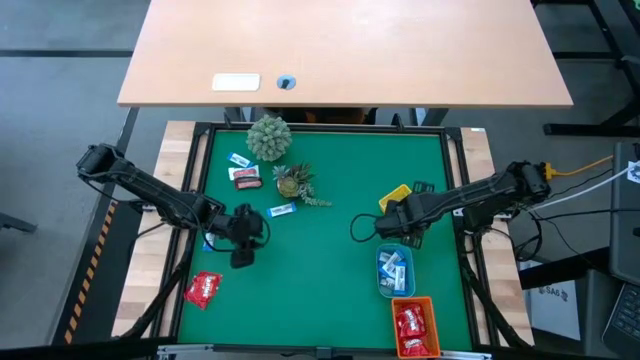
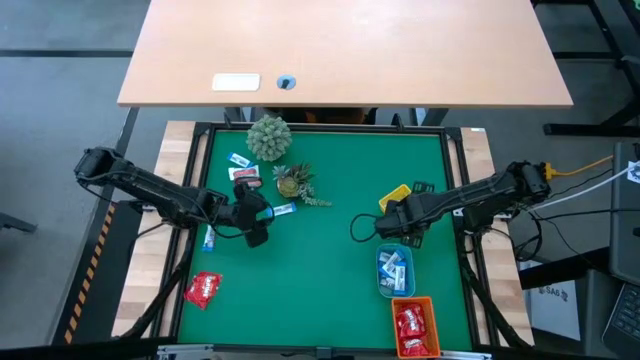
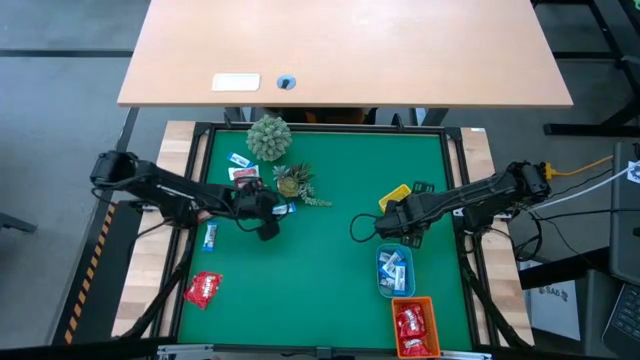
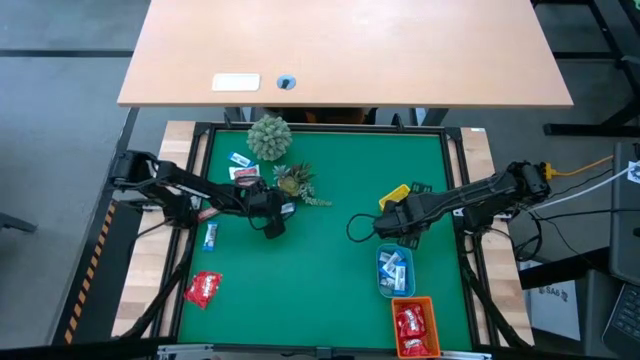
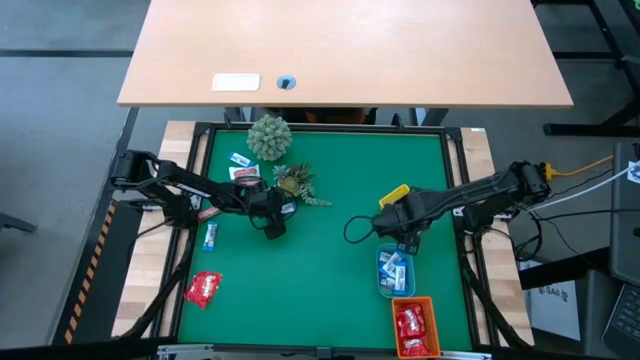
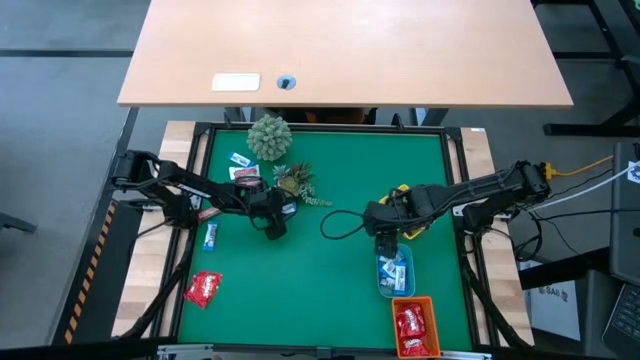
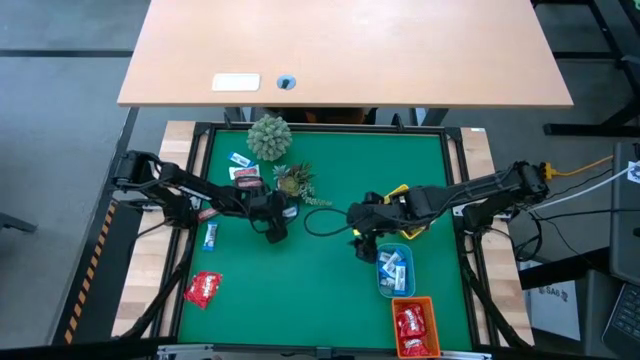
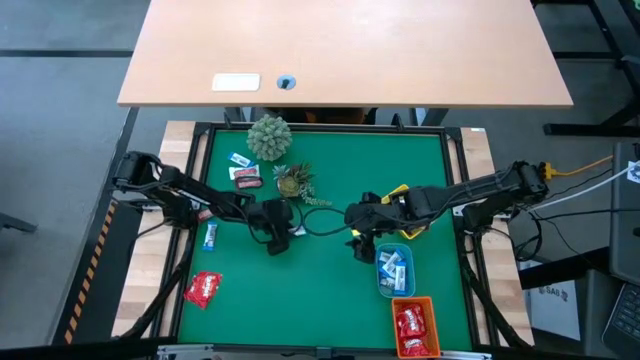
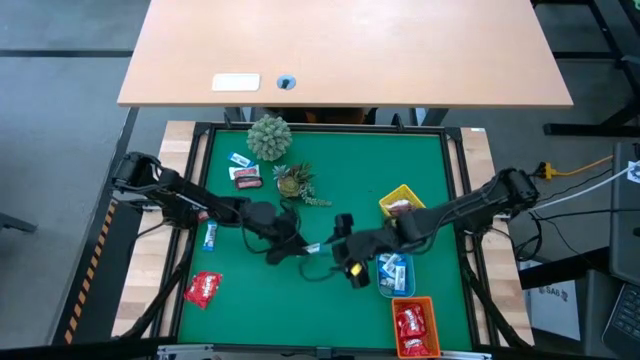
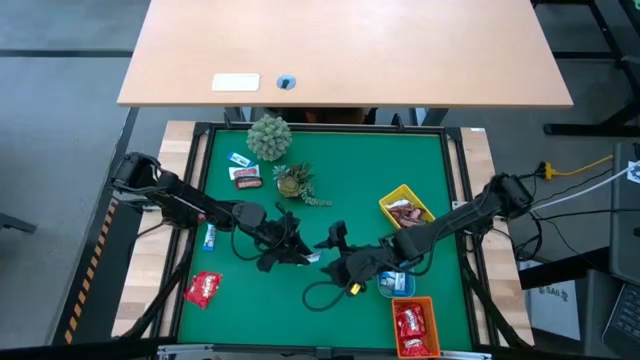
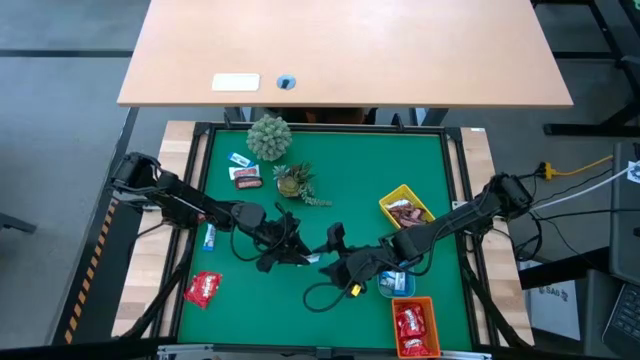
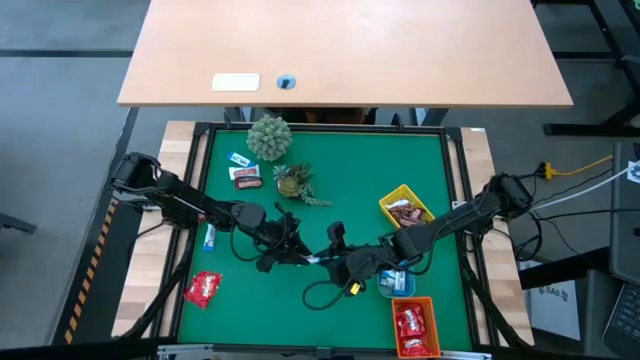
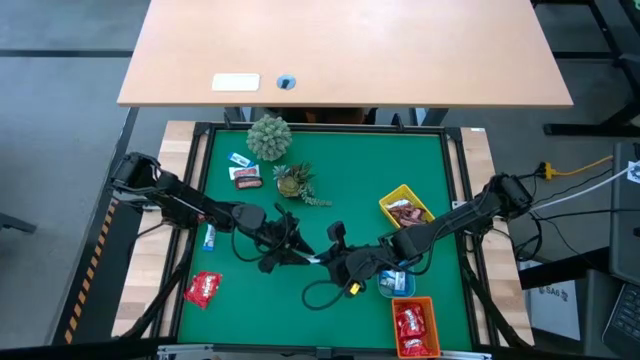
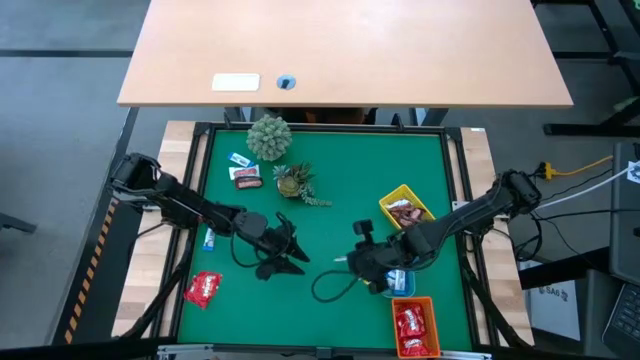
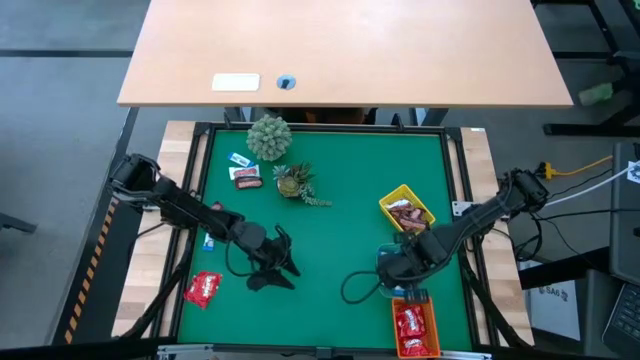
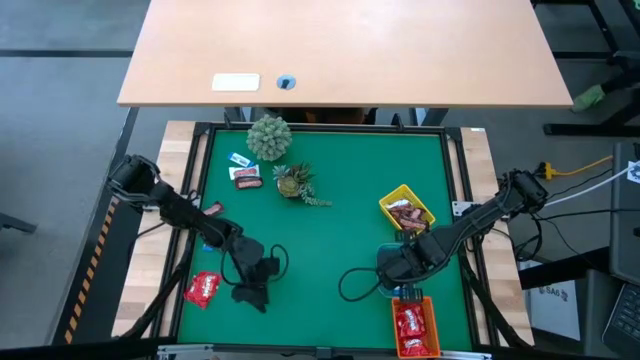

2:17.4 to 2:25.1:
Task: Sort candy
Put the white chocolate into the blue bin

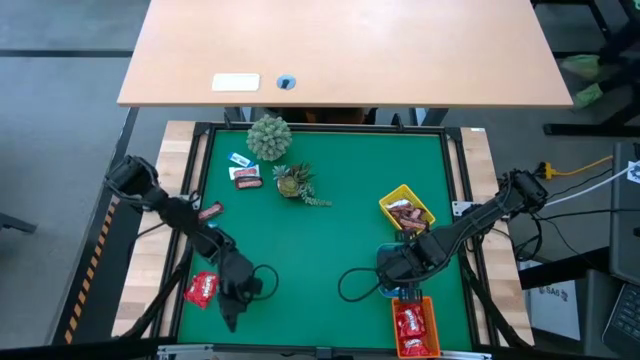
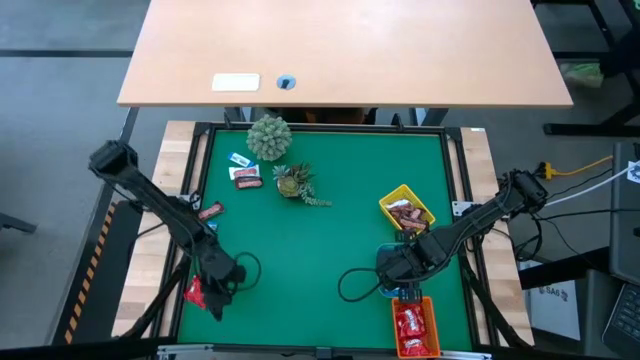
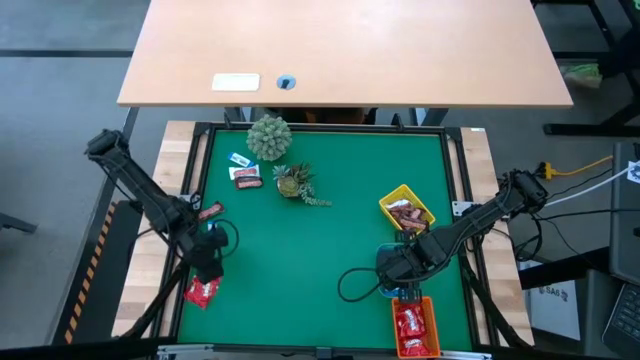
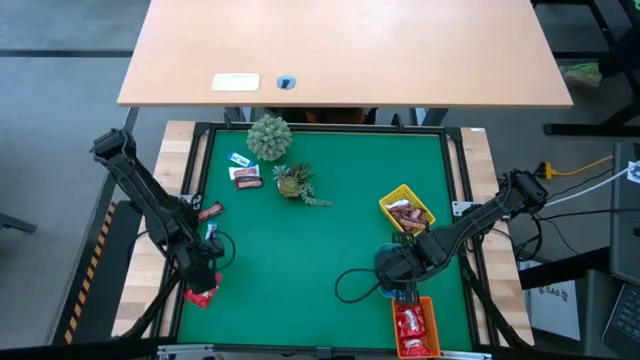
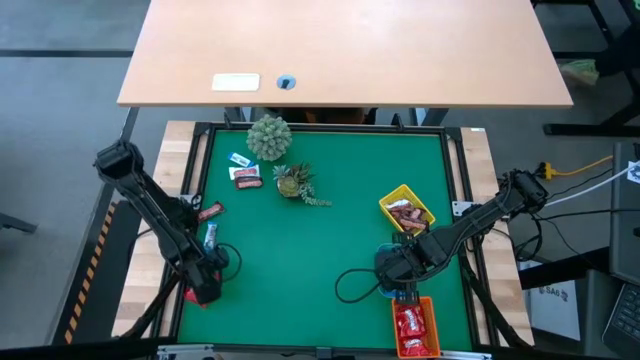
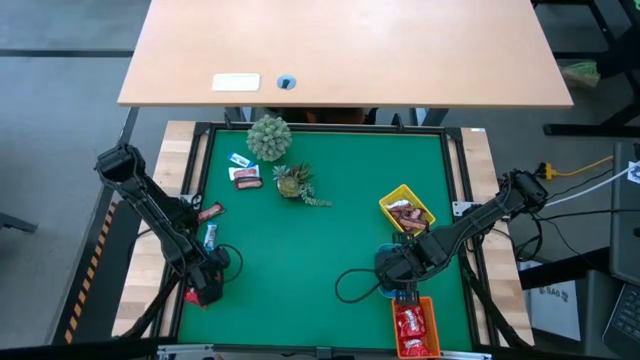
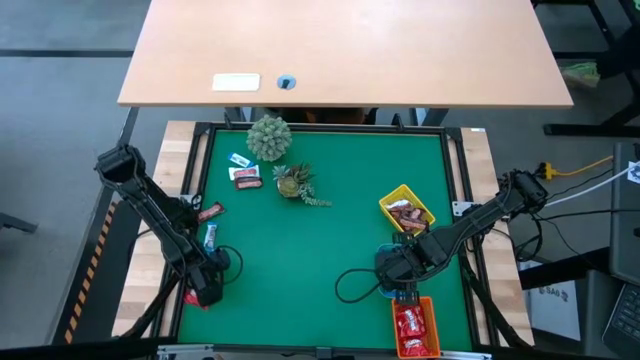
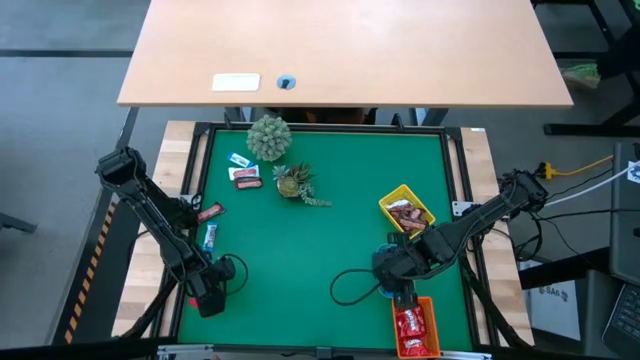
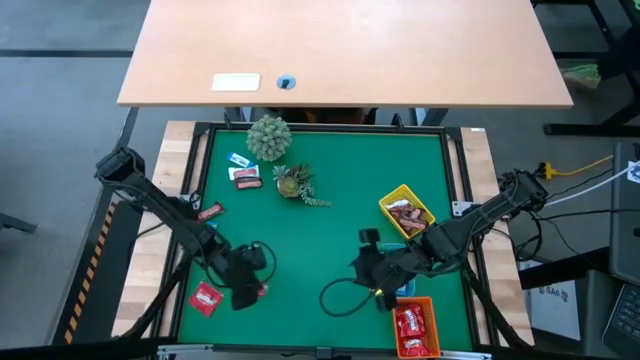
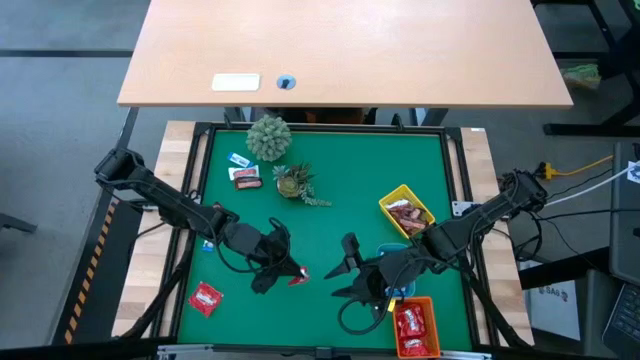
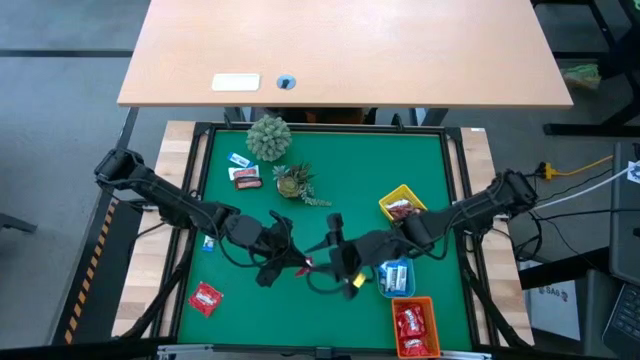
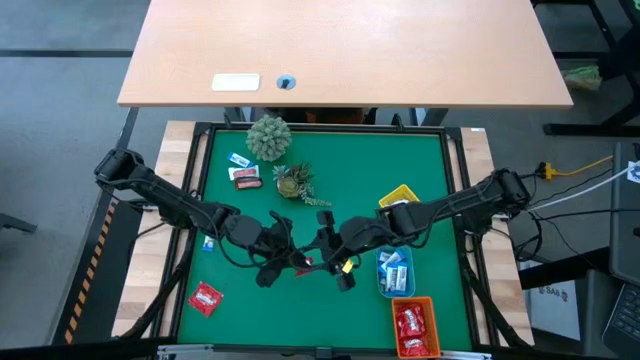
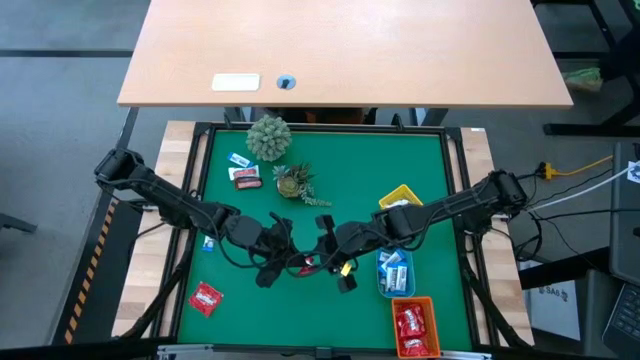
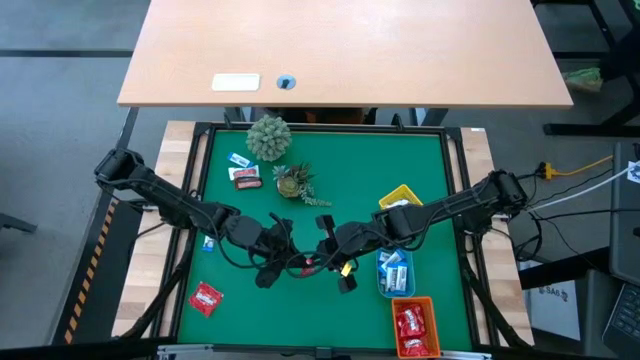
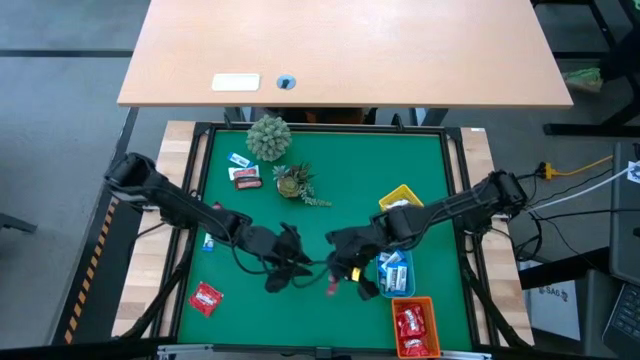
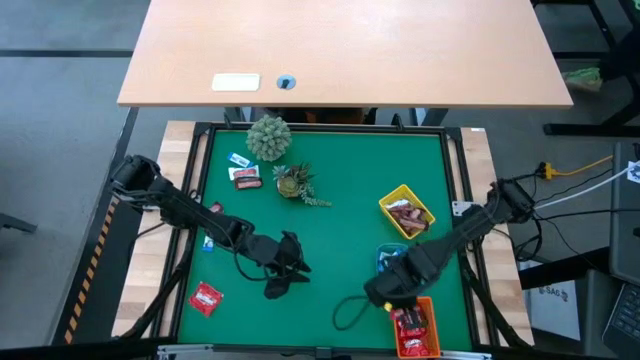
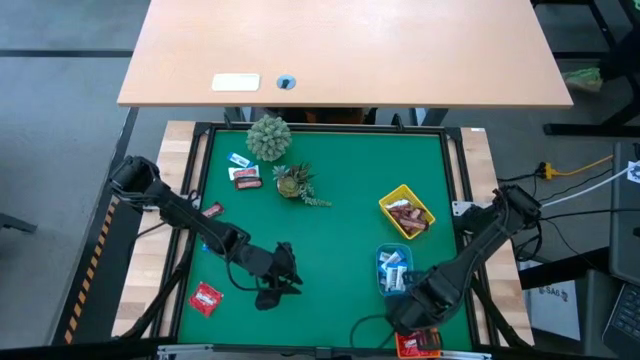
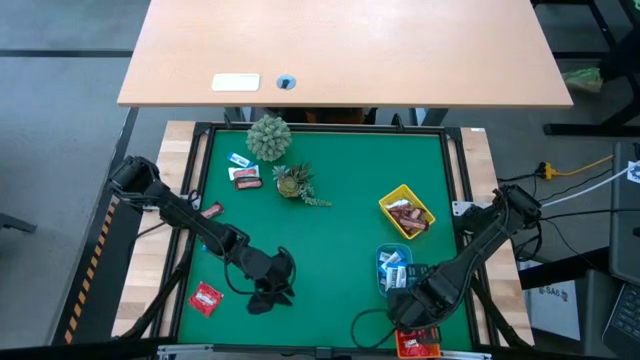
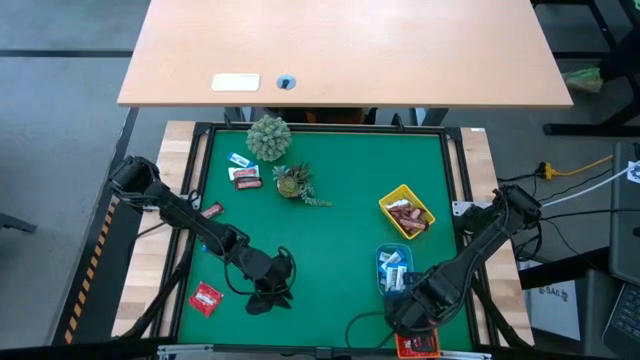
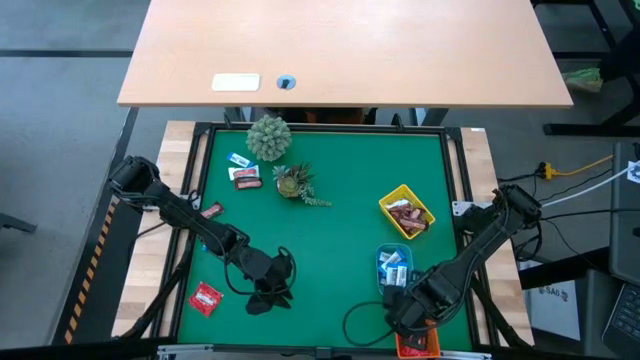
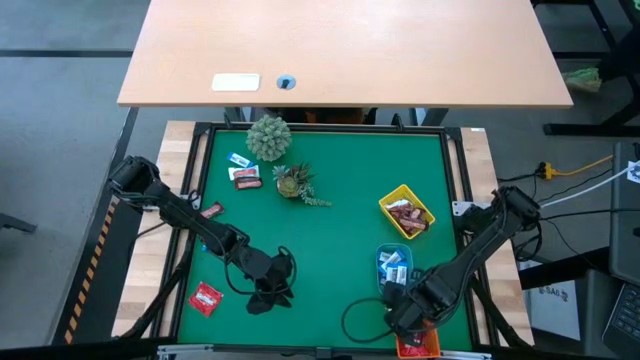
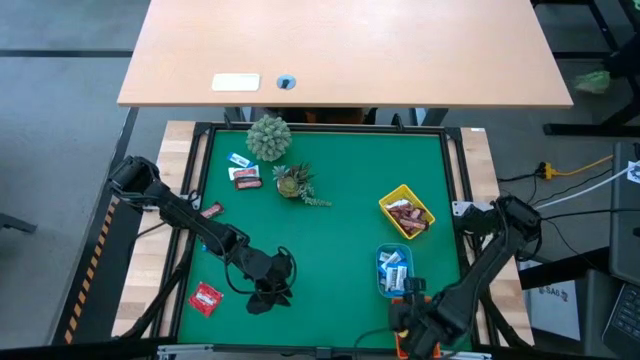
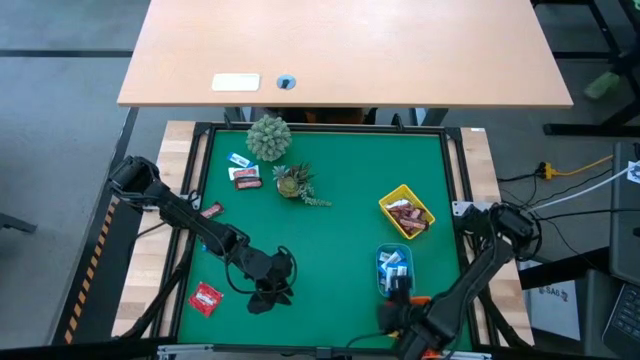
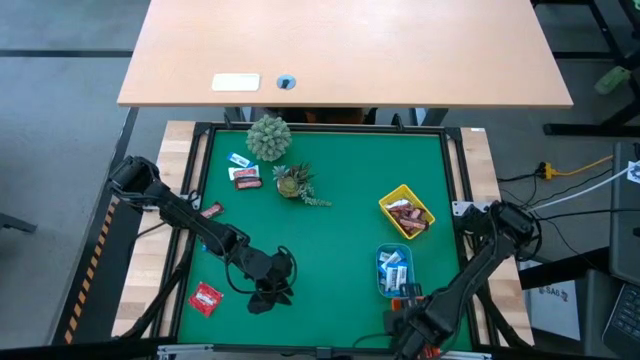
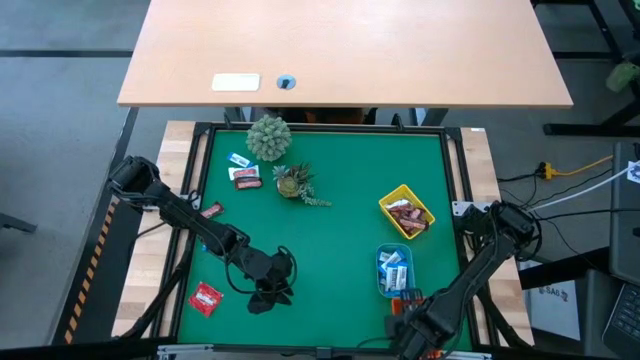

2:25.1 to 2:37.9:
Put the red candy into the orange bin
